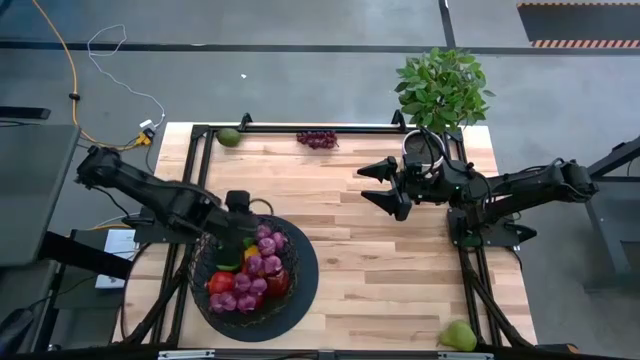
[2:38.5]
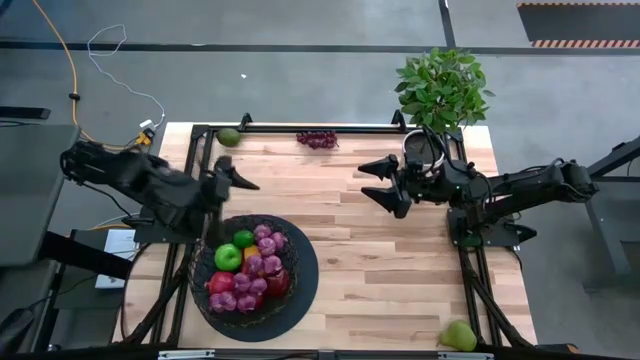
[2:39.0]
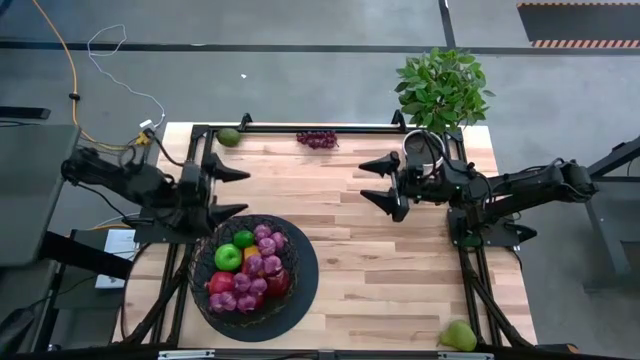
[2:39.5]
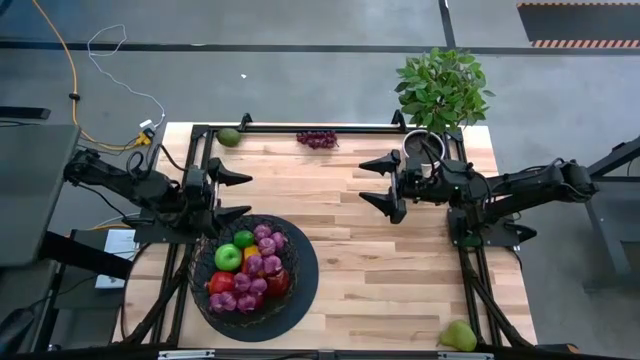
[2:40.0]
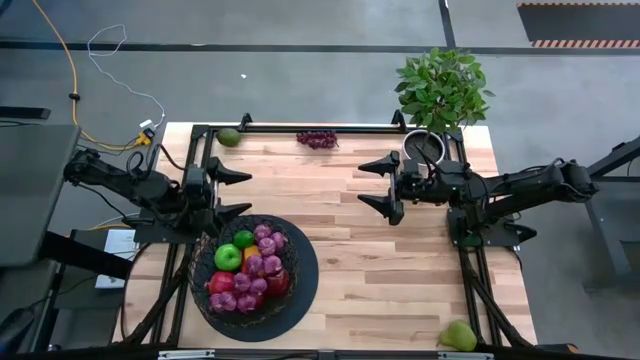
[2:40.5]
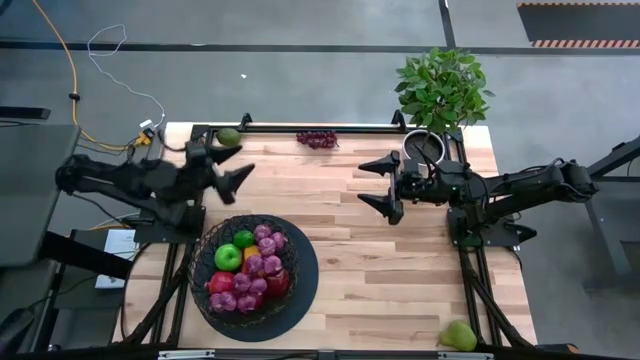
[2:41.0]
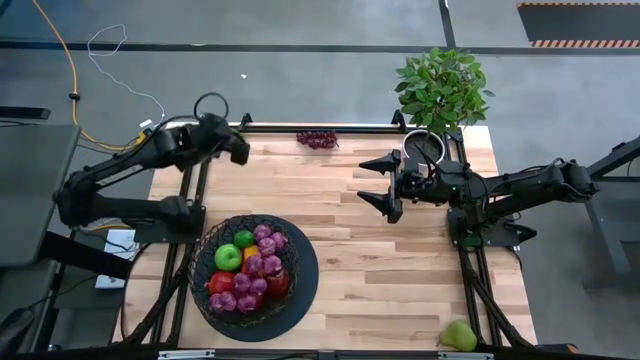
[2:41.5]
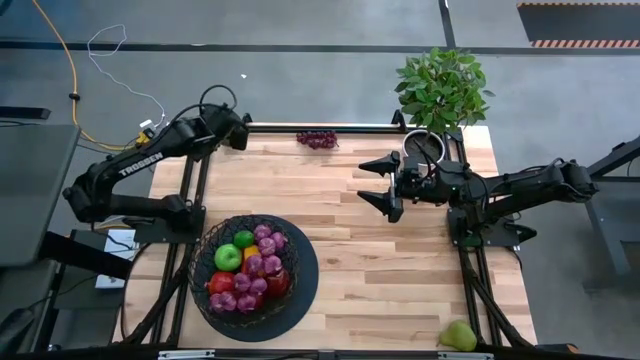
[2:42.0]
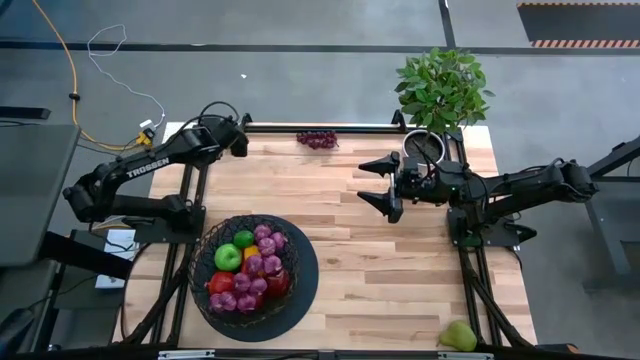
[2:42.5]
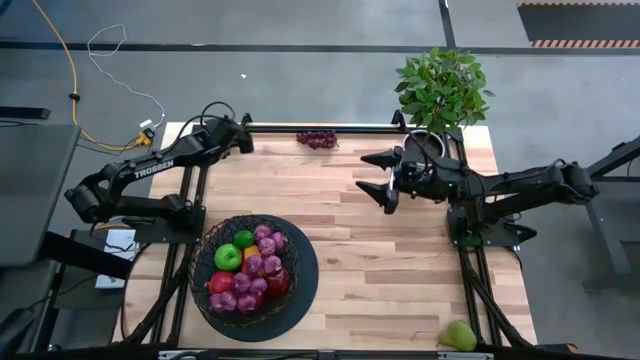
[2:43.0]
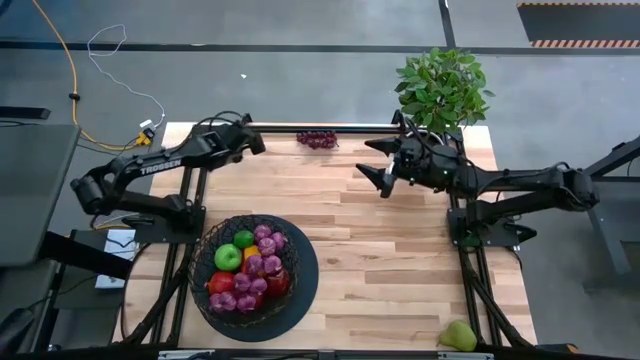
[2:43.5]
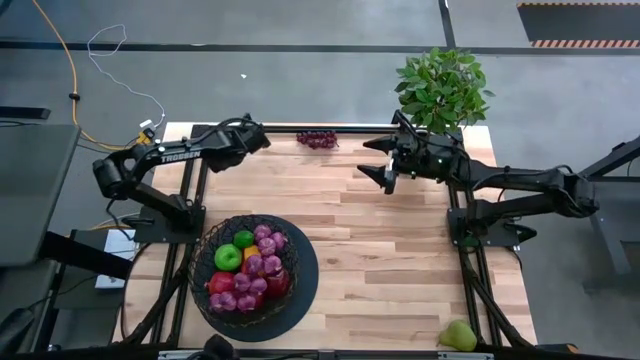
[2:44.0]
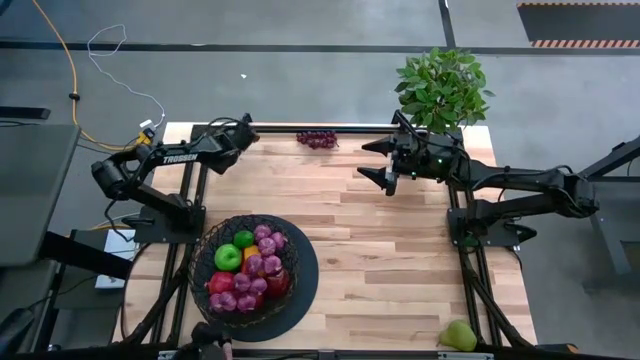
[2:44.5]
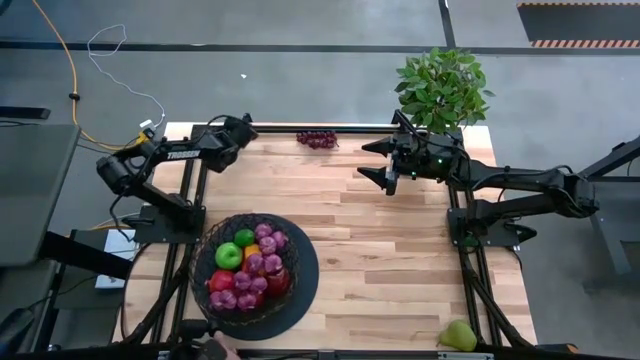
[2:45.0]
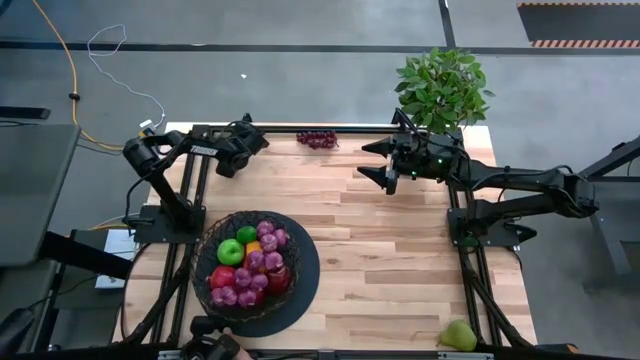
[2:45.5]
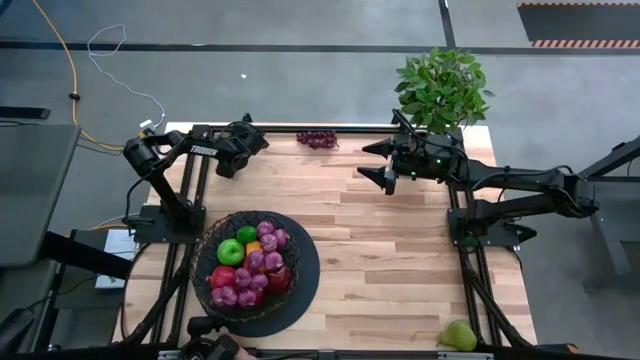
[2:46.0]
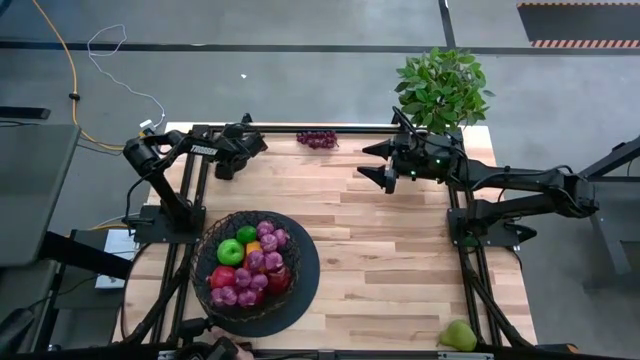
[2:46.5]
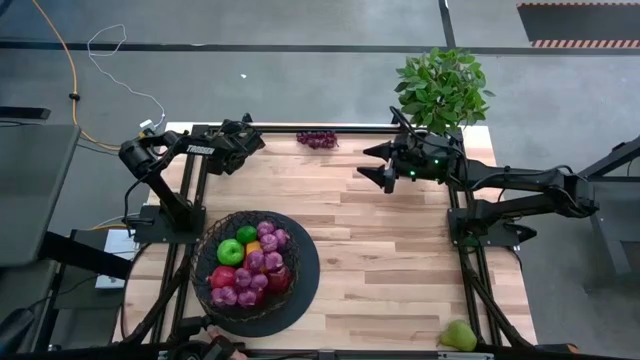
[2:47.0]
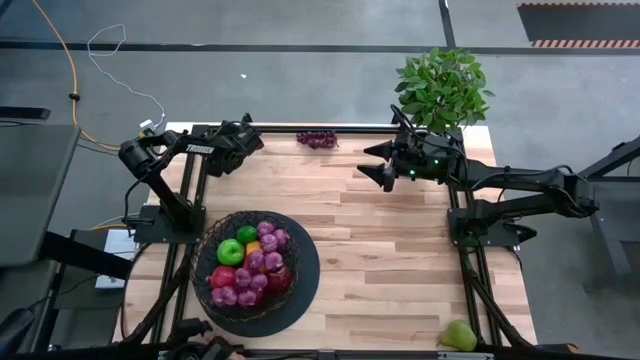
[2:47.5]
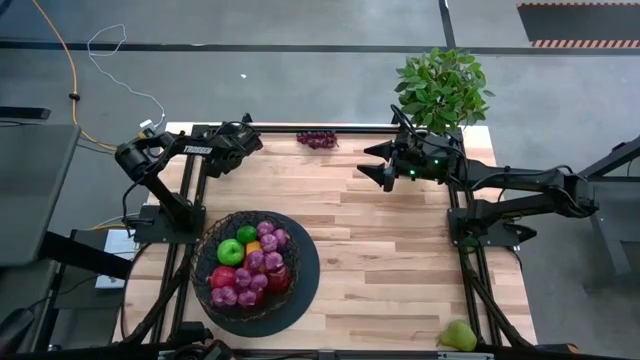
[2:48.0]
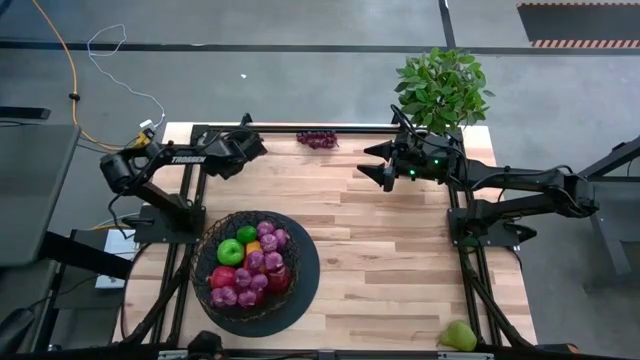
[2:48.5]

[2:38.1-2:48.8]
Task: Build produce basket
Put the lime into the black basket

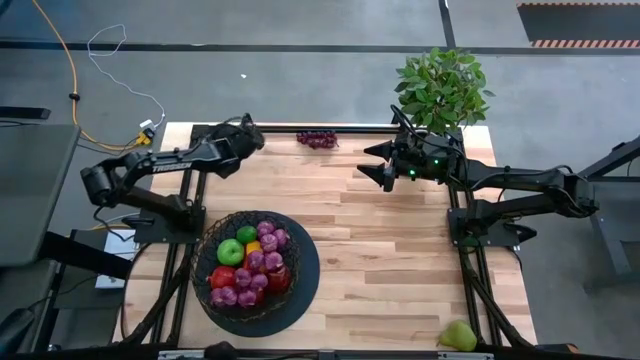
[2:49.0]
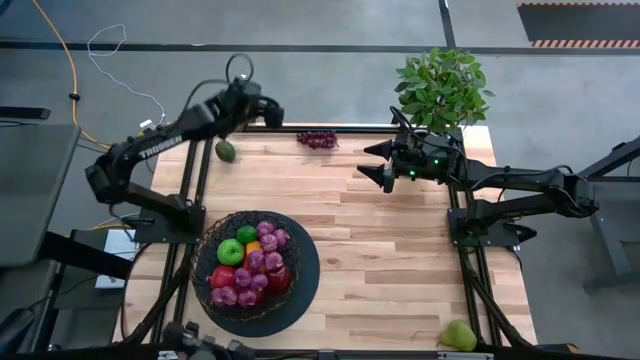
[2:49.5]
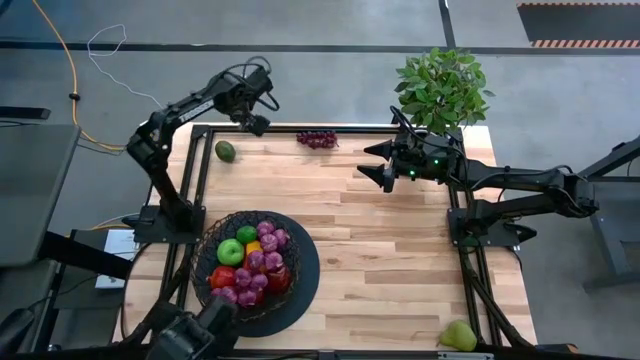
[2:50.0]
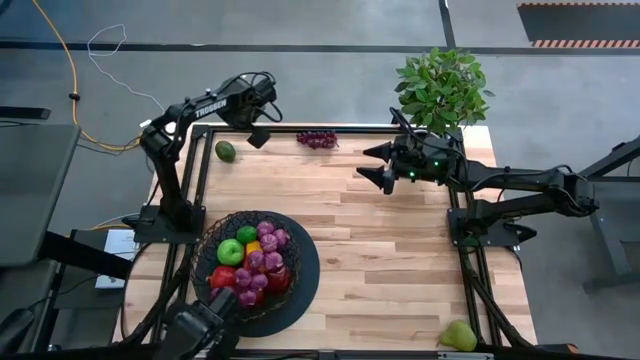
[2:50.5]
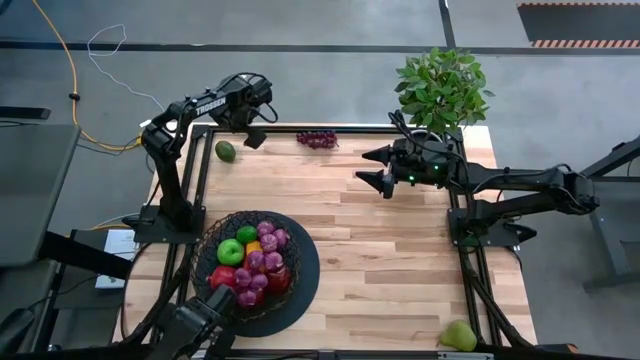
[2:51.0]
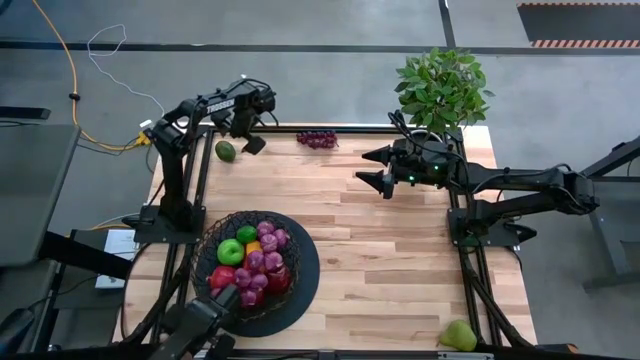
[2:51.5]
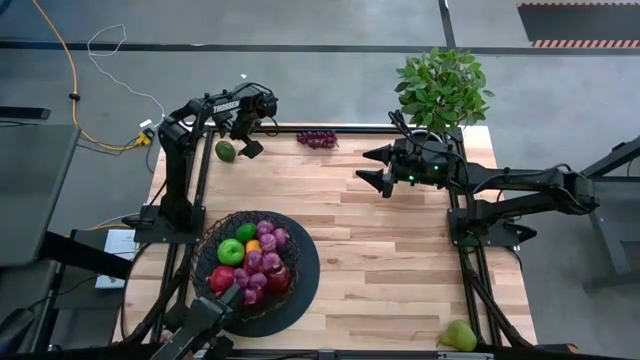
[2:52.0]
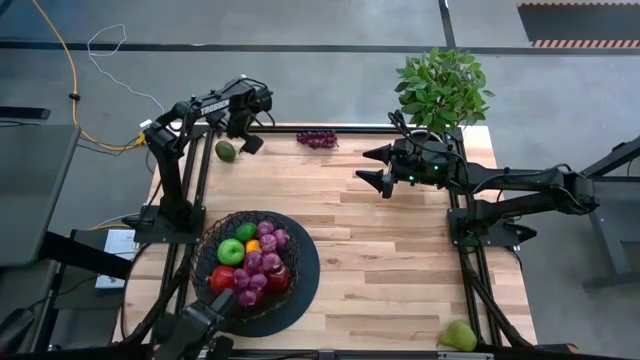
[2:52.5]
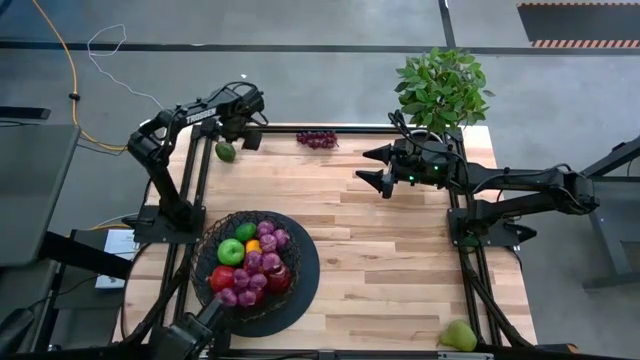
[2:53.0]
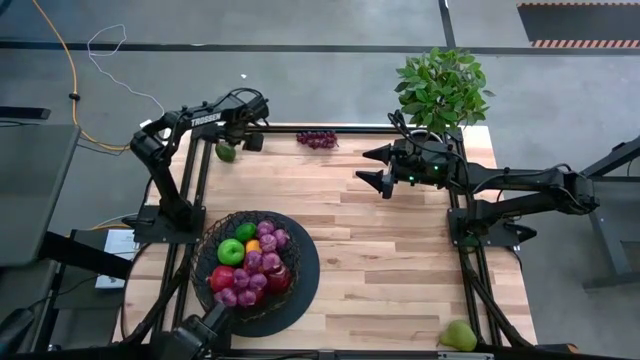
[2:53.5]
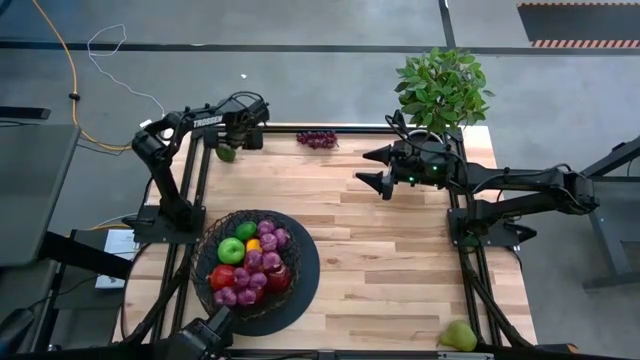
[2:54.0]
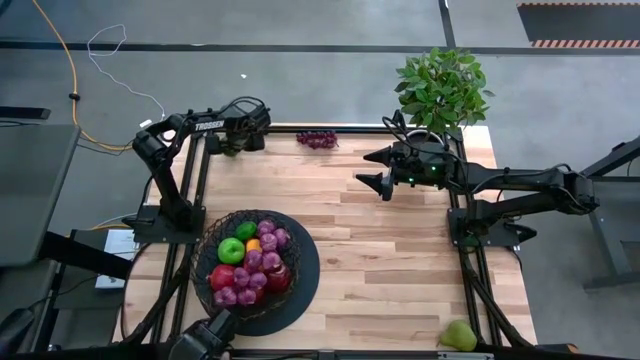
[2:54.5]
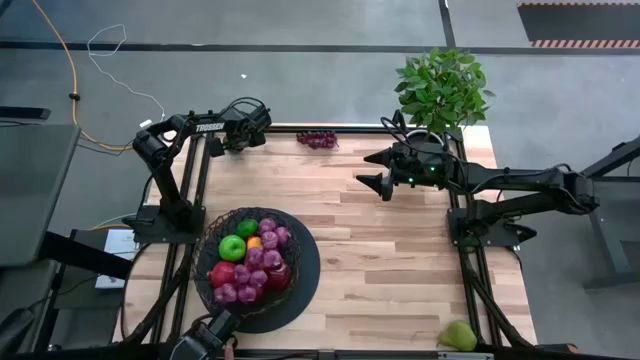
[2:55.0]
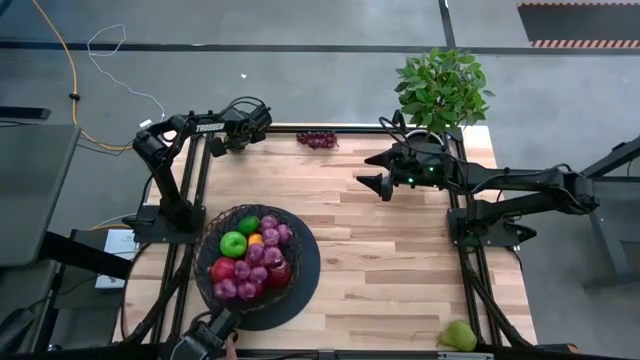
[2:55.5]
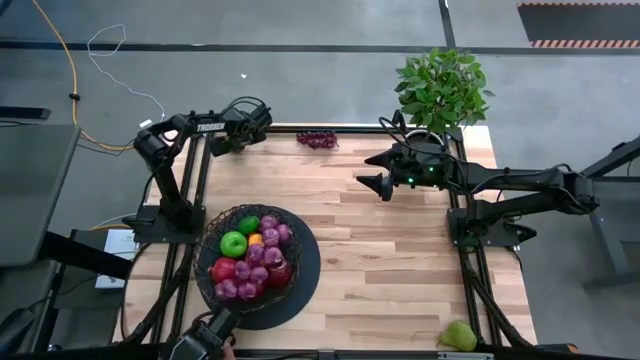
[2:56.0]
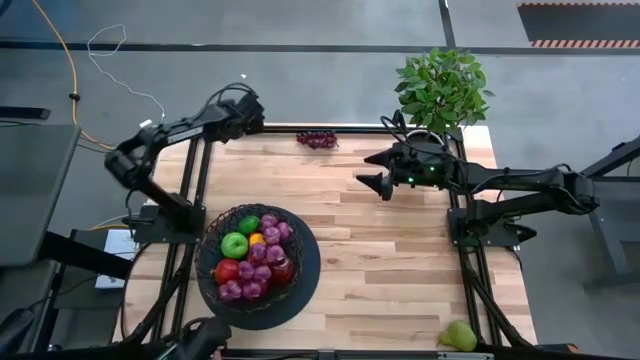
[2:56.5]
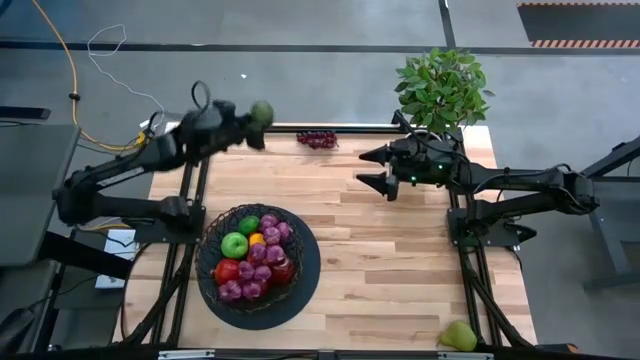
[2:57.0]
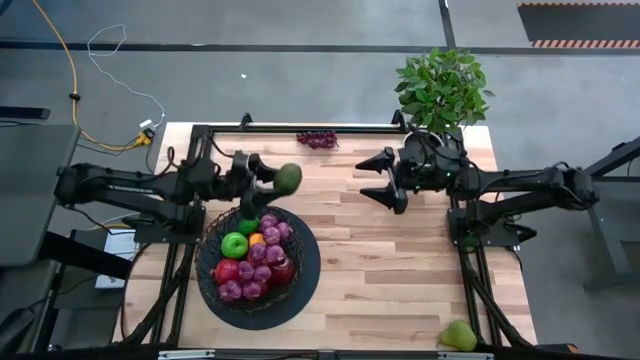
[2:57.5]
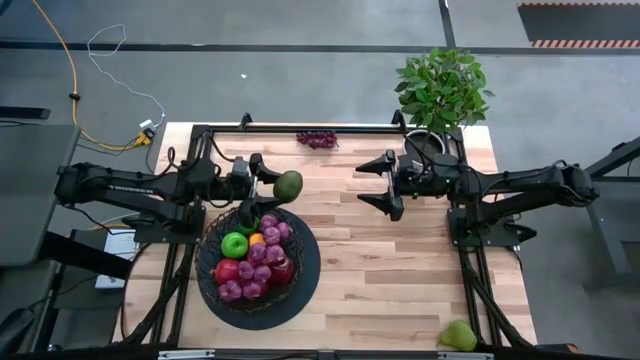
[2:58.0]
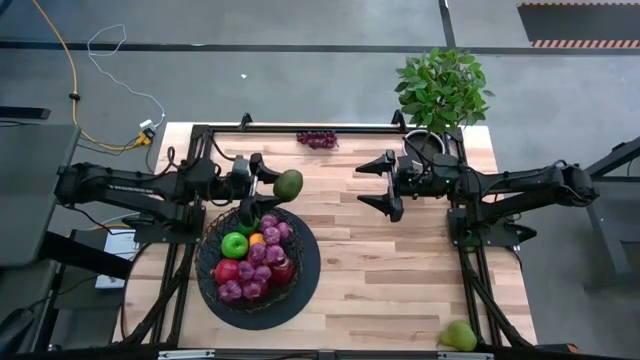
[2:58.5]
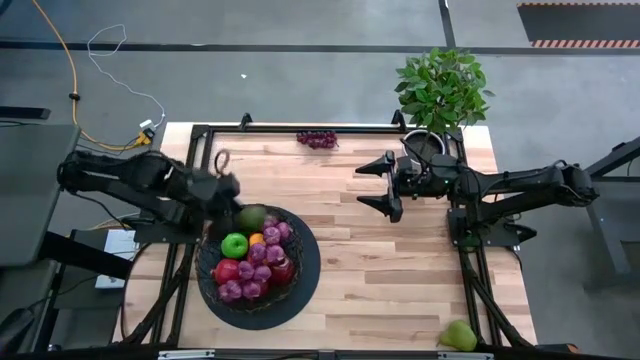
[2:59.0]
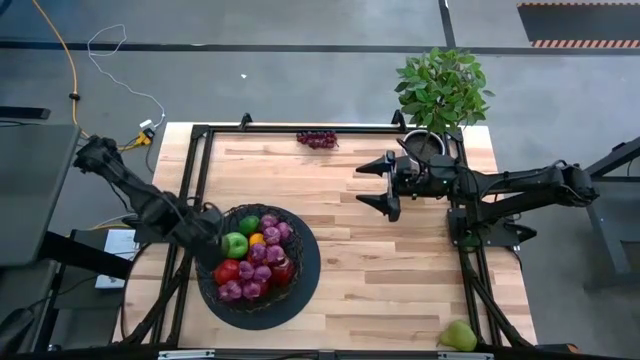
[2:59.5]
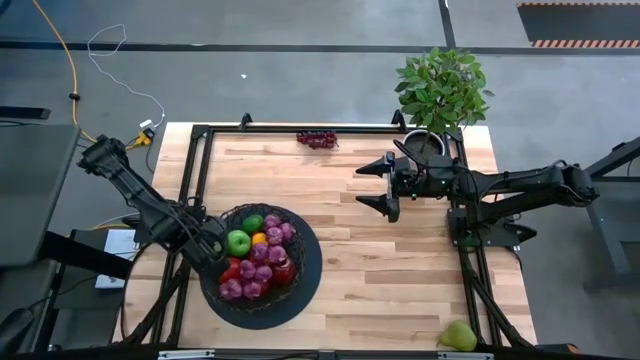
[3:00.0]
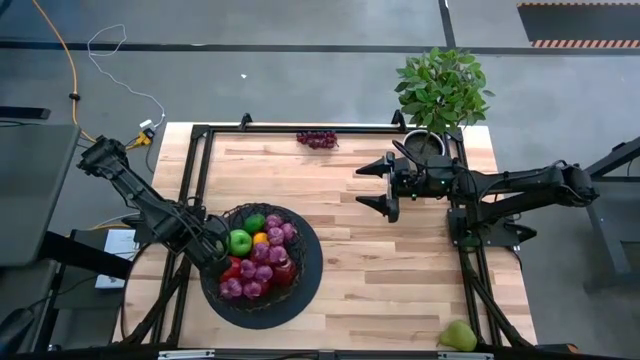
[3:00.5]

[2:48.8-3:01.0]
Put the lime into the black basket
